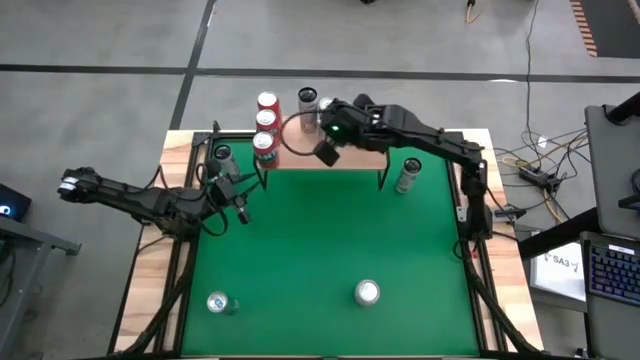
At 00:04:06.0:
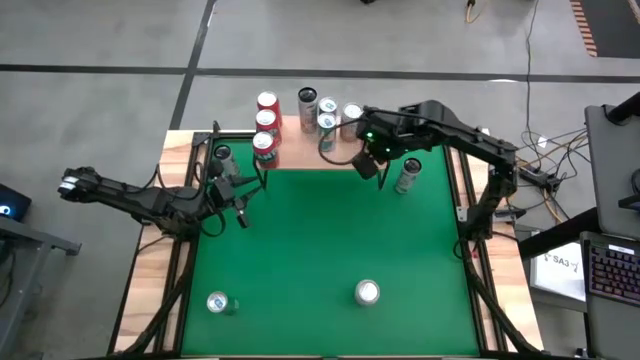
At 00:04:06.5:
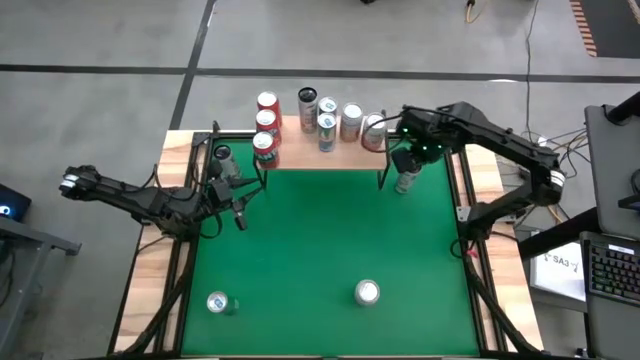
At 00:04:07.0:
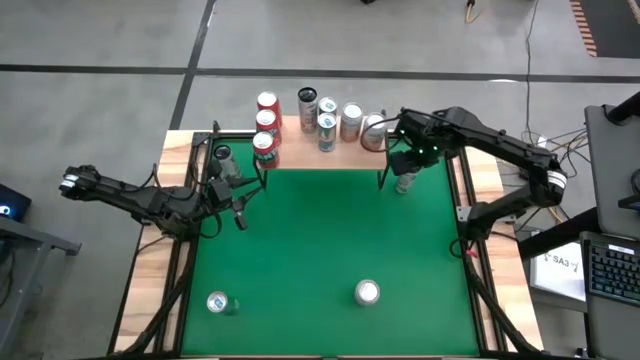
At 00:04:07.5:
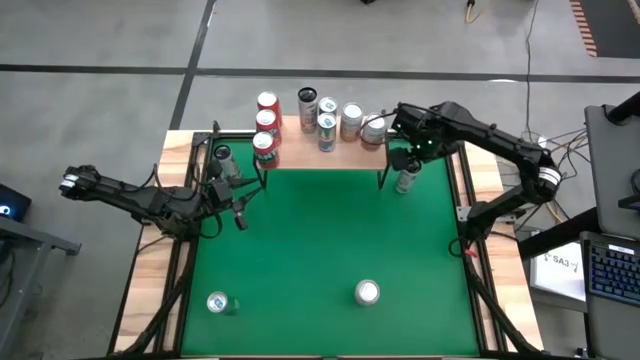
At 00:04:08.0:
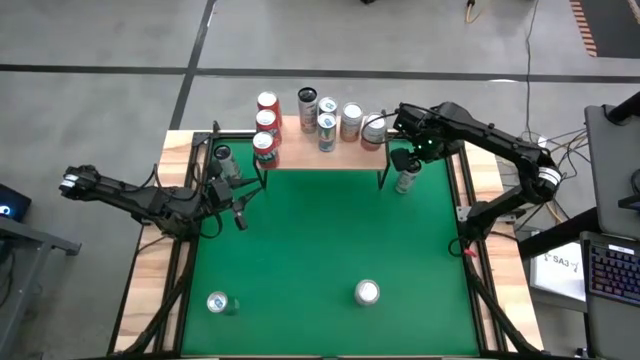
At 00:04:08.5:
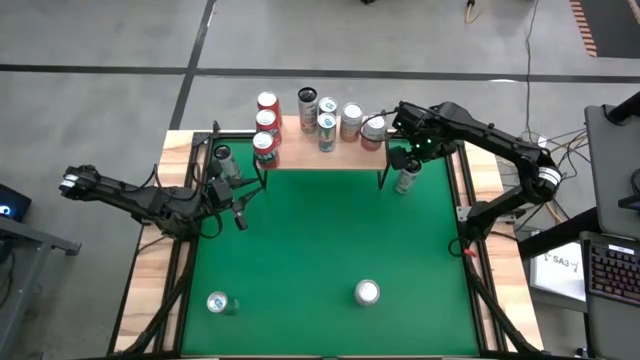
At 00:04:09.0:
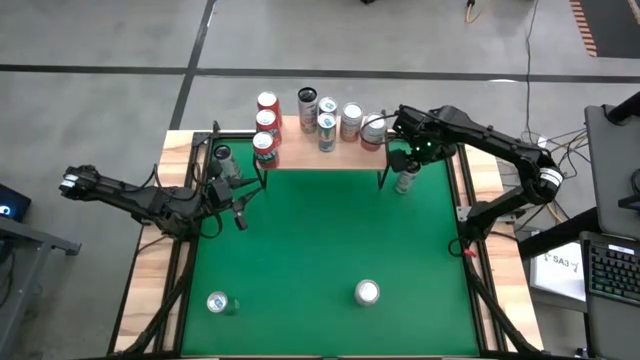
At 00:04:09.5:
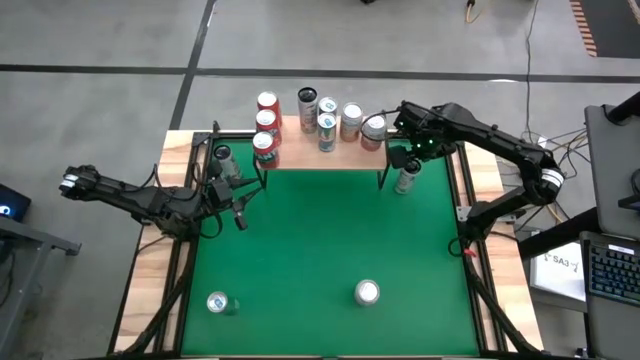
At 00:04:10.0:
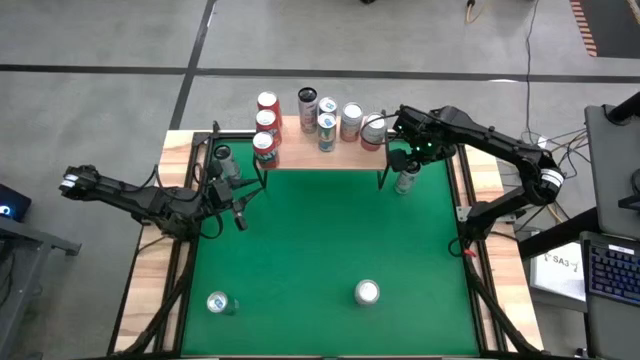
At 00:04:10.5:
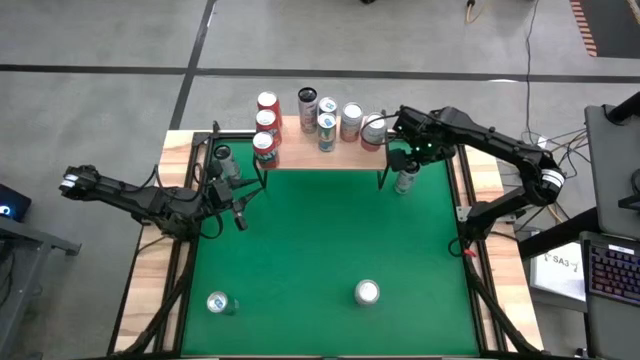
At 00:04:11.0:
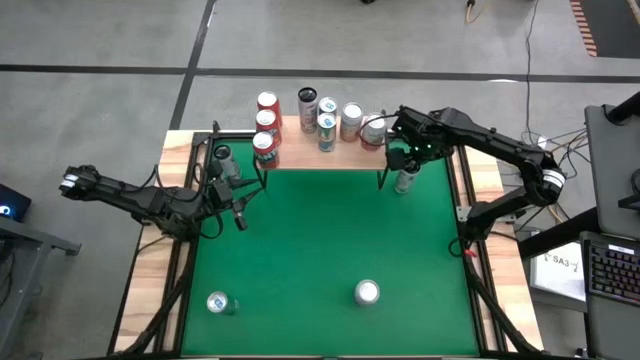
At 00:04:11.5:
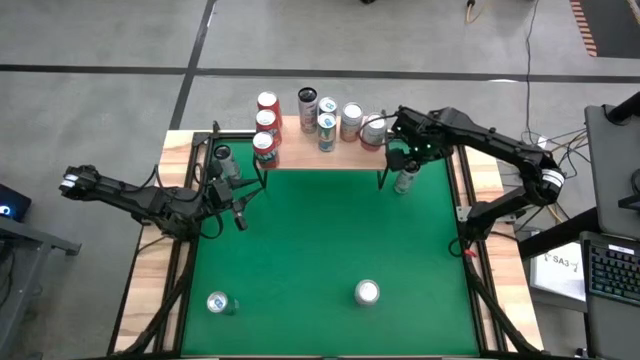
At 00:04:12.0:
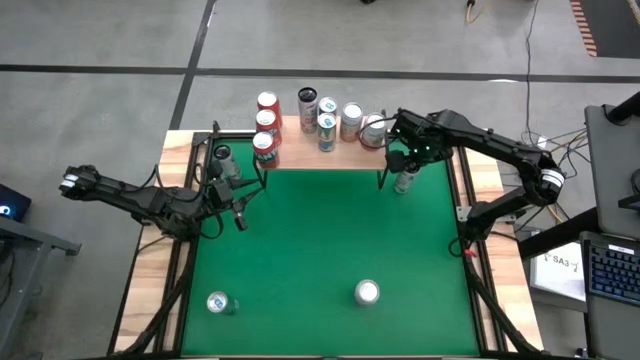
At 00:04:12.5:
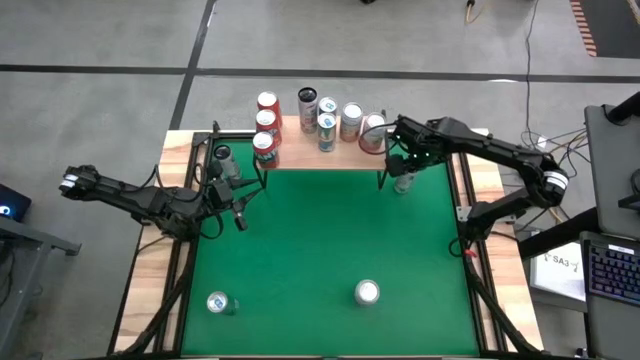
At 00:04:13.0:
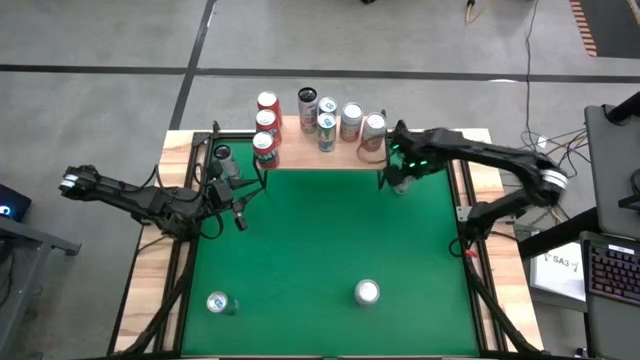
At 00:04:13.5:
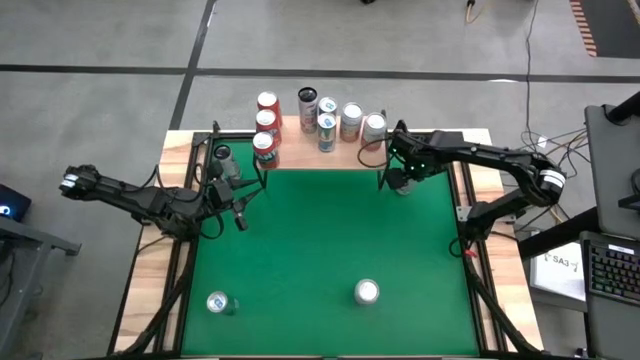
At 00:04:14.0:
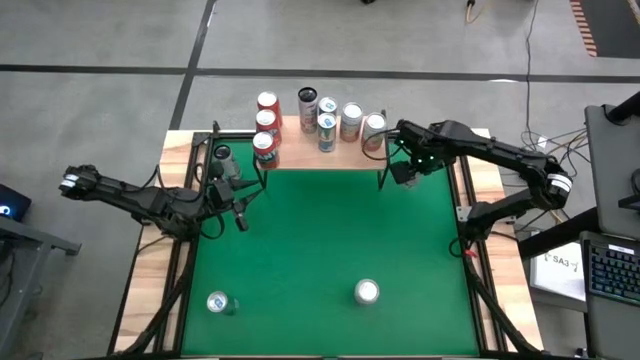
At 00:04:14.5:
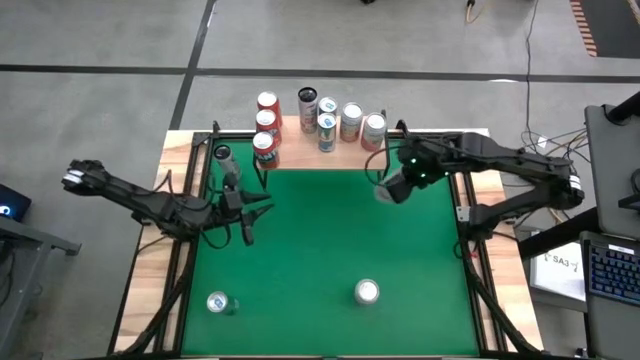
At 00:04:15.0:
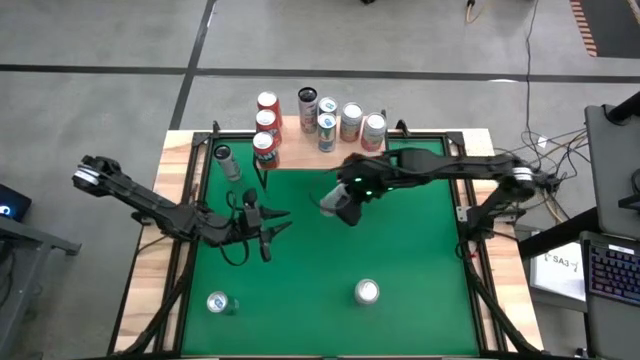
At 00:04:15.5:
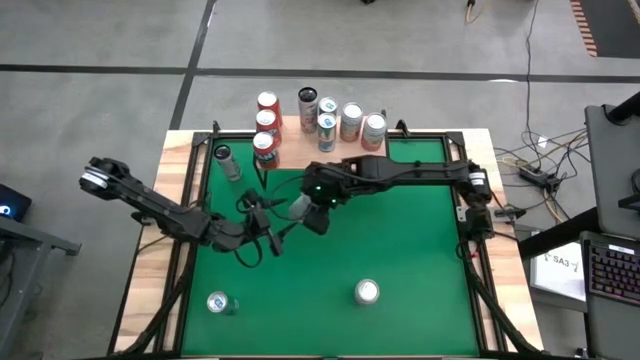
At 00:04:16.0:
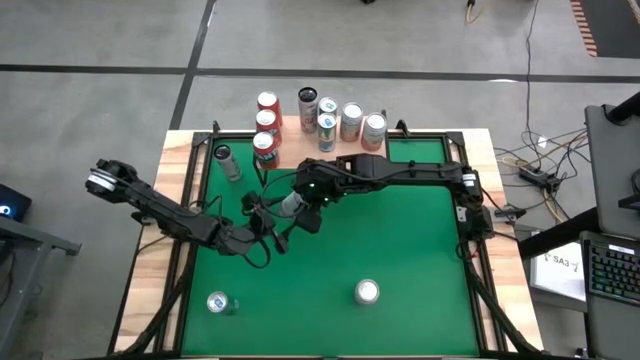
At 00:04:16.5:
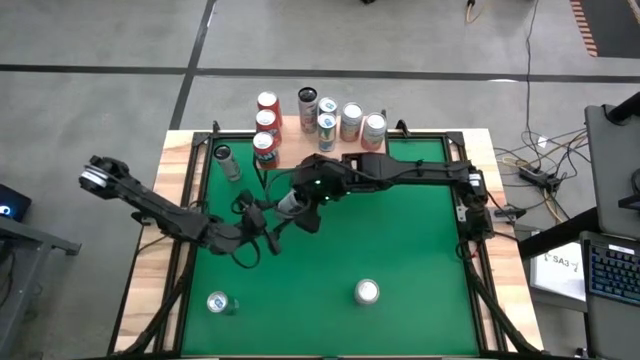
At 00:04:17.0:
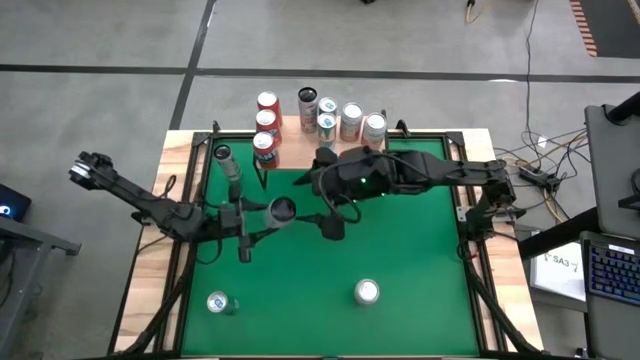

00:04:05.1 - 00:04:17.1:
Task: Place canned beverage on shelf
Put the right white soda can on the shelf aligned with other white soda cans

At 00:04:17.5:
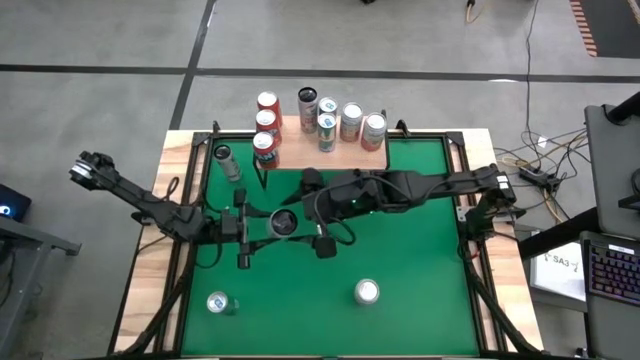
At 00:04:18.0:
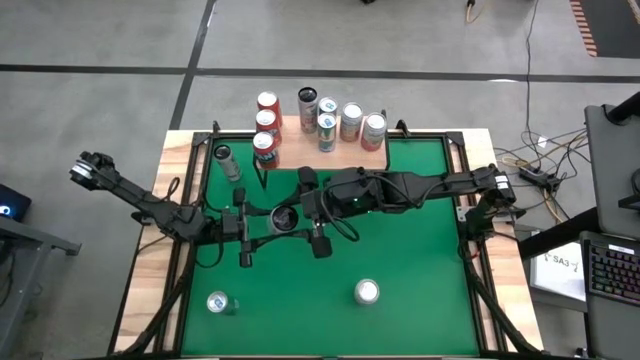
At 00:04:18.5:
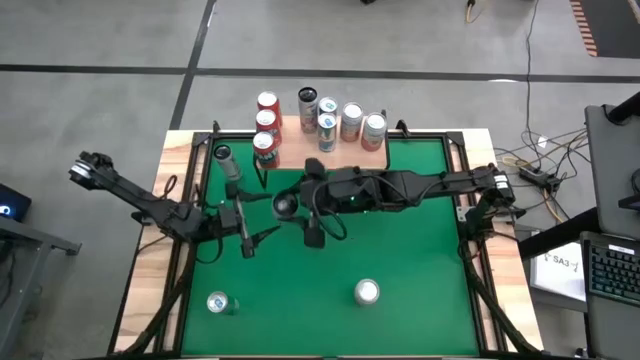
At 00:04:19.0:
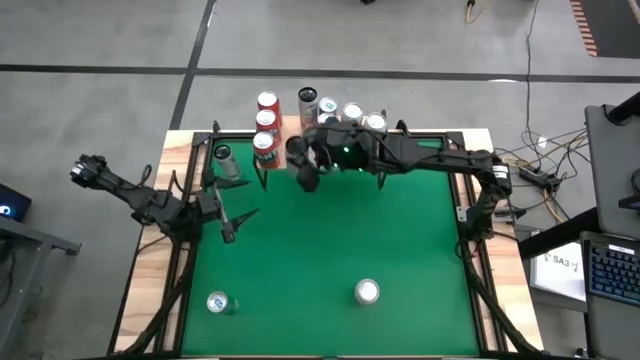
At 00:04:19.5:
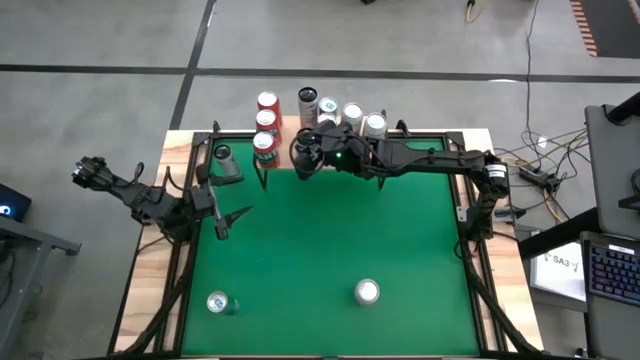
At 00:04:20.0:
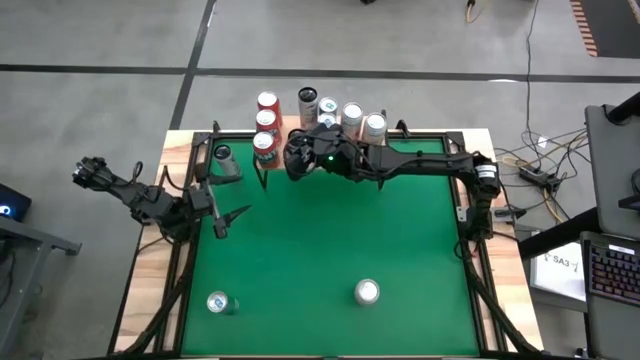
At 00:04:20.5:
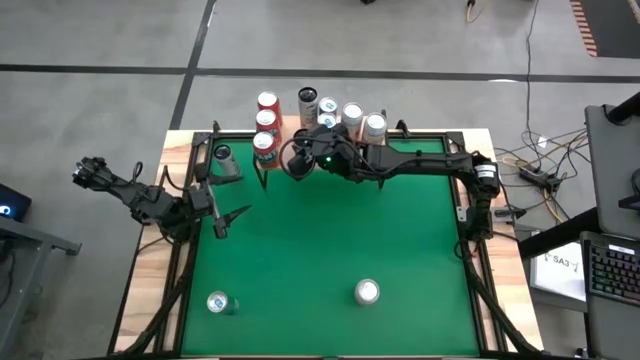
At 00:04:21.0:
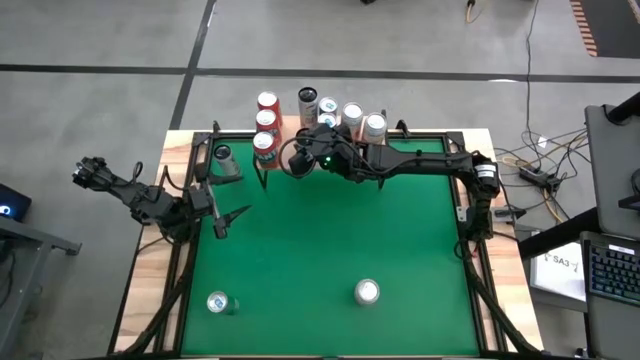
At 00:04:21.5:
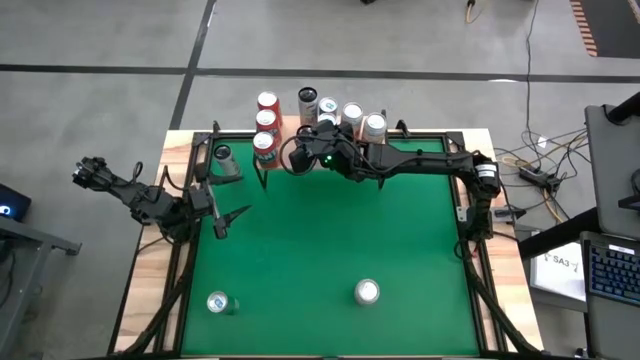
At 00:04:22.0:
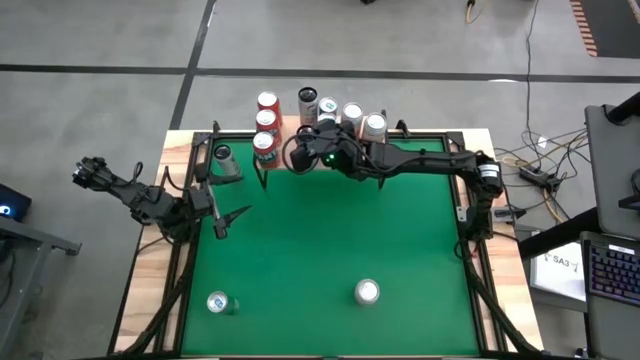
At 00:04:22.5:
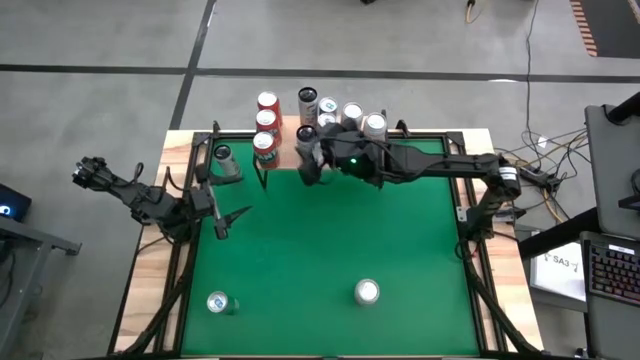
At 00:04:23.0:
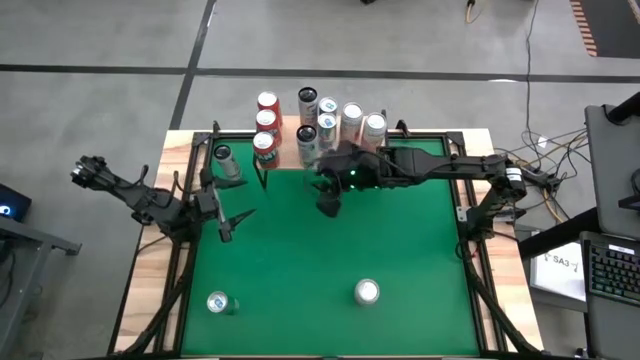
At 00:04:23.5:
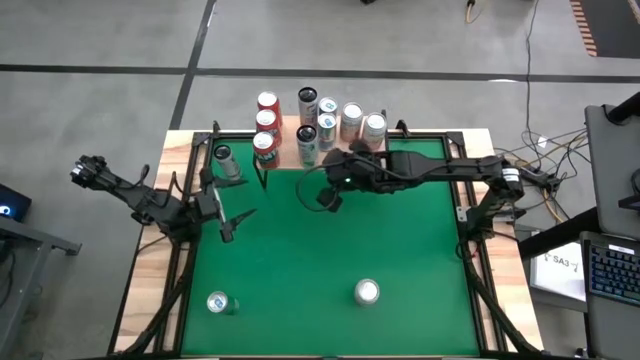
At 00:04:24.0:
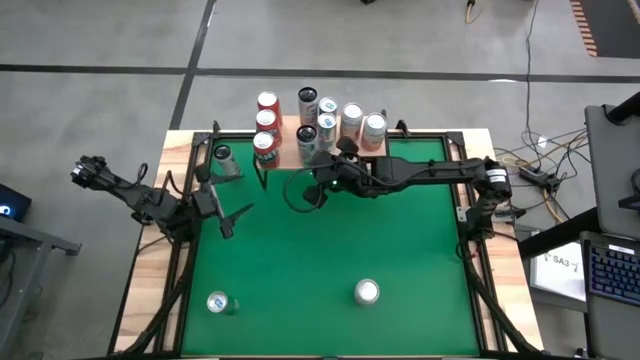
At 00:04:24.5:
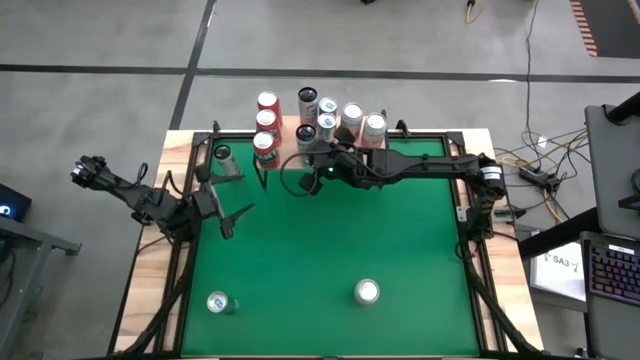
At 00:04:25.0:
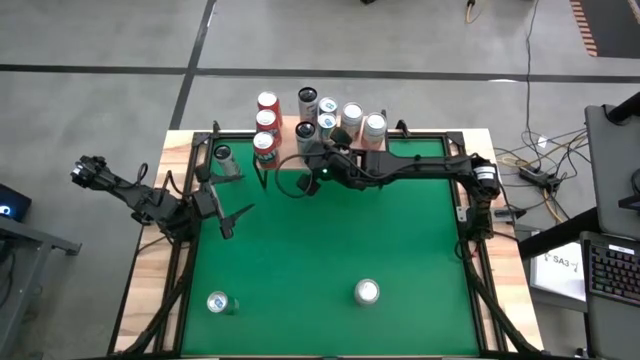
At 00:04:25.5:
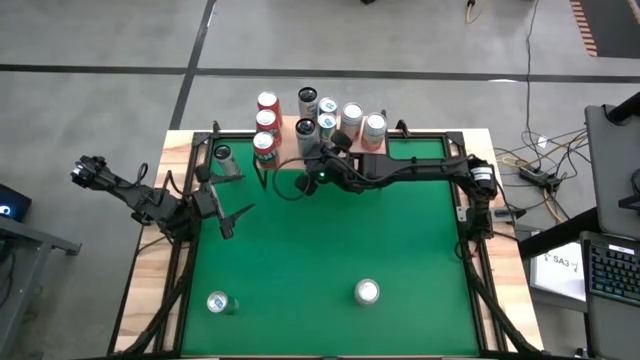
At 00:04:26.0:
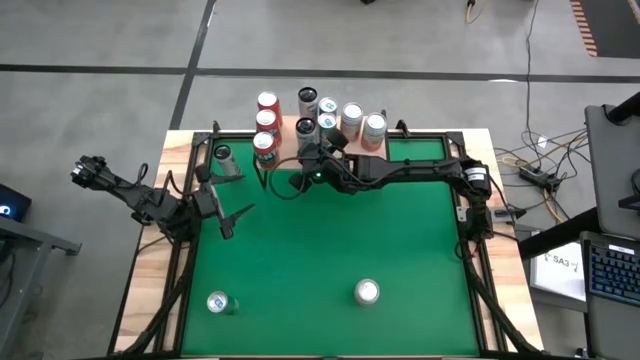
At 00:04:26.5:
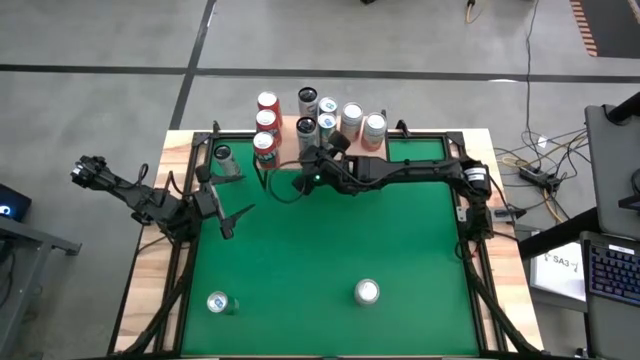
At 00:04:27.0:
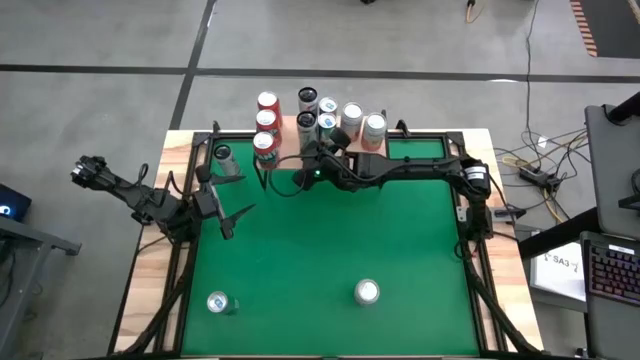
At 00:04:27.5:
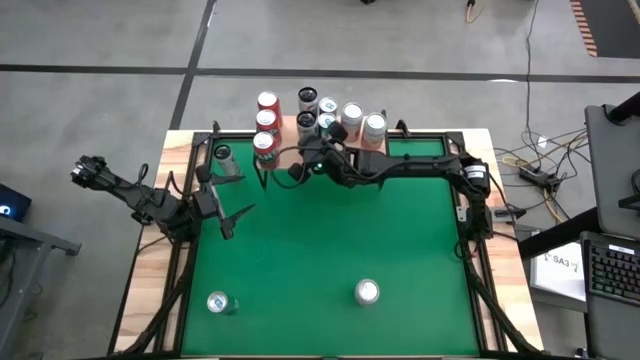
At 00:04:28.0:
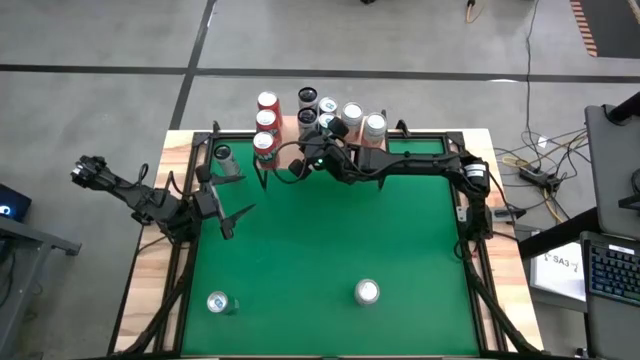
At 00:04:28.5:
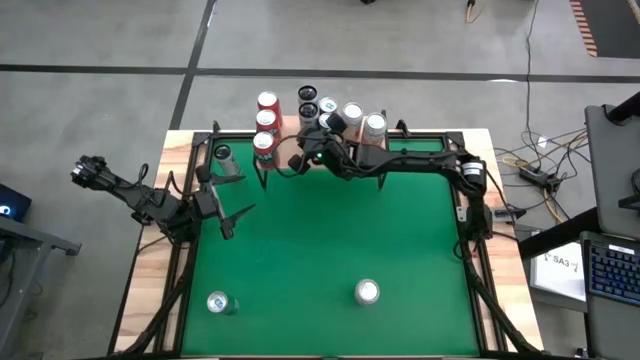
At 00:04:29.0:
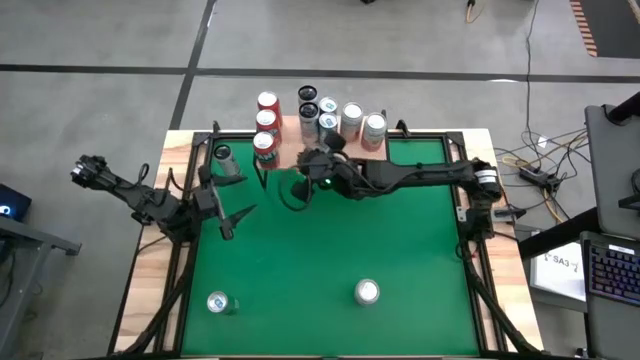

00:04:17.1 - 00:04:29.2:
Put the right white soda can on the shelf aligned with other white soda cans
